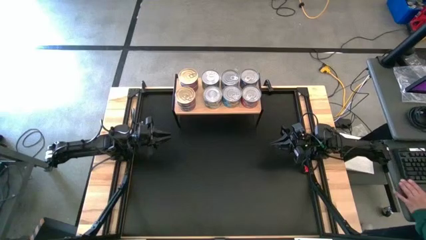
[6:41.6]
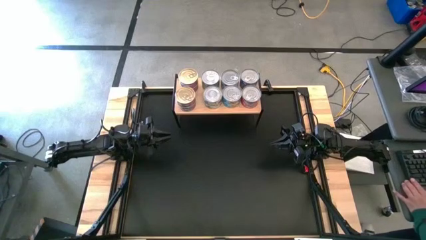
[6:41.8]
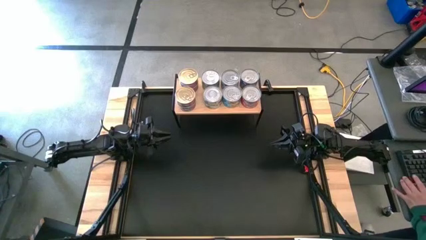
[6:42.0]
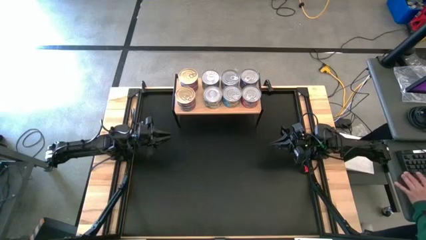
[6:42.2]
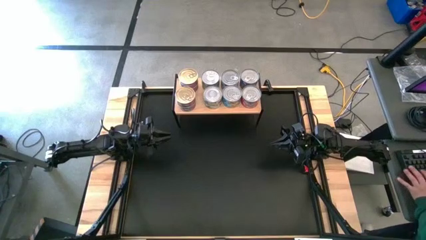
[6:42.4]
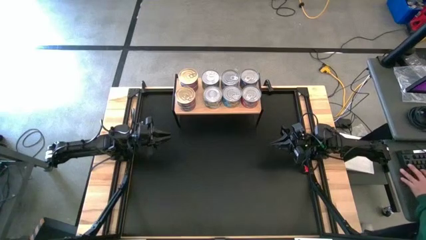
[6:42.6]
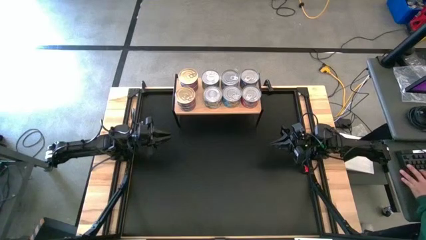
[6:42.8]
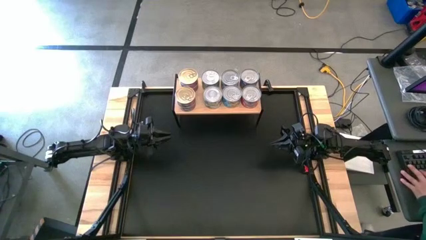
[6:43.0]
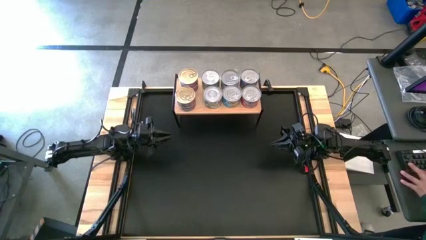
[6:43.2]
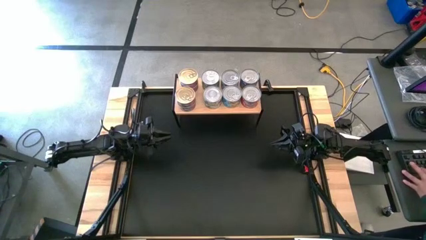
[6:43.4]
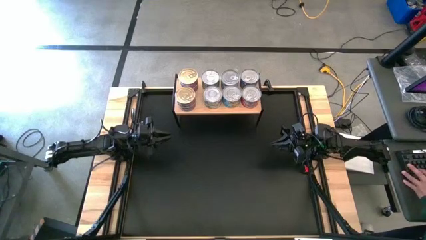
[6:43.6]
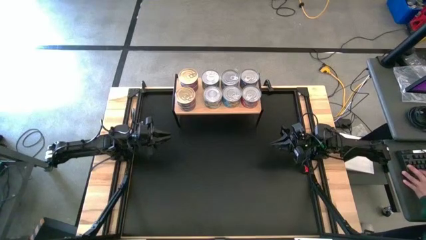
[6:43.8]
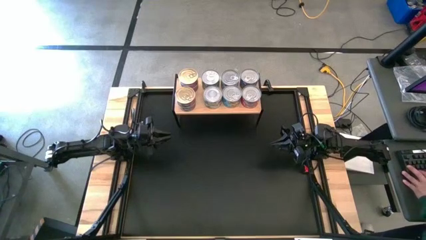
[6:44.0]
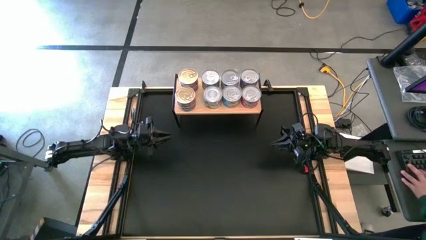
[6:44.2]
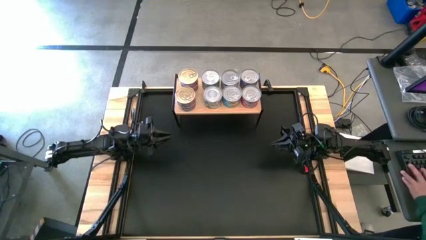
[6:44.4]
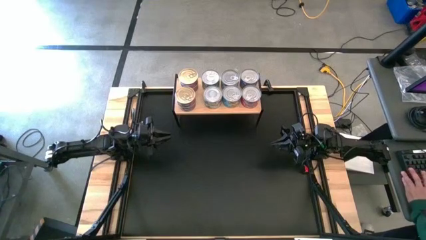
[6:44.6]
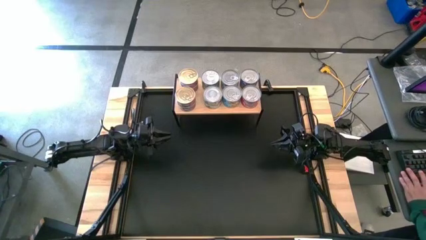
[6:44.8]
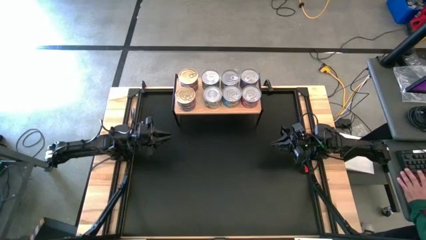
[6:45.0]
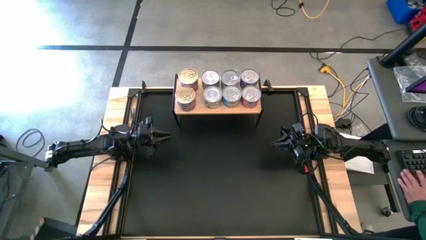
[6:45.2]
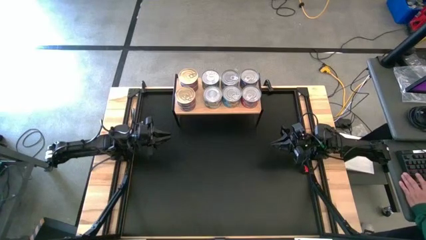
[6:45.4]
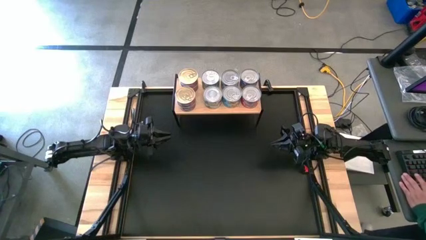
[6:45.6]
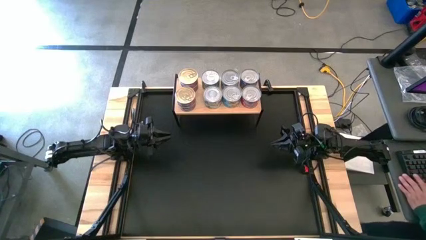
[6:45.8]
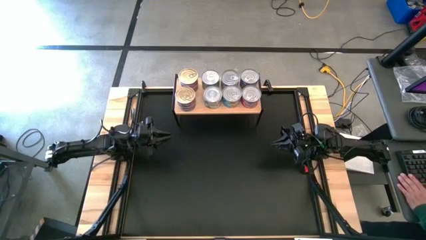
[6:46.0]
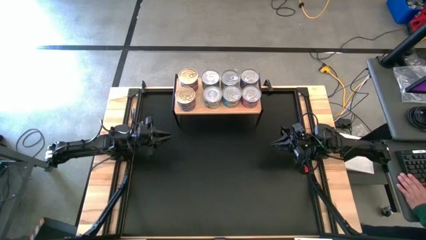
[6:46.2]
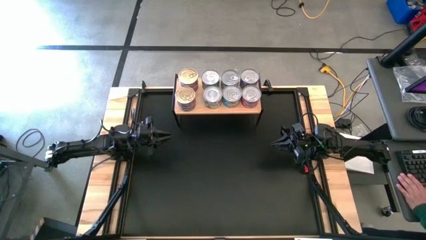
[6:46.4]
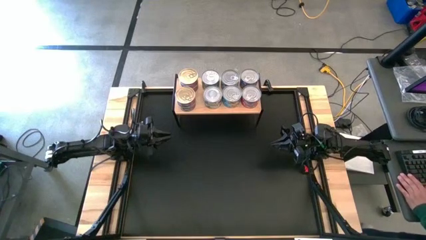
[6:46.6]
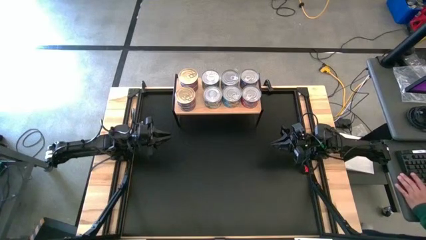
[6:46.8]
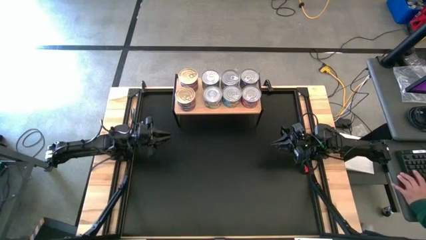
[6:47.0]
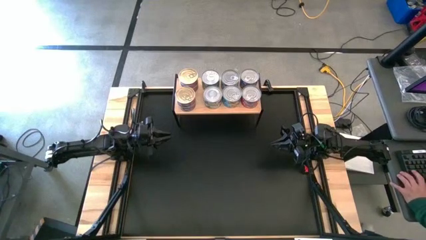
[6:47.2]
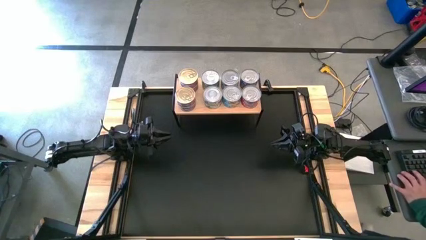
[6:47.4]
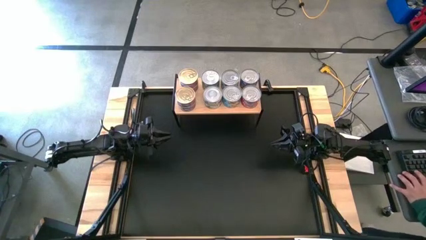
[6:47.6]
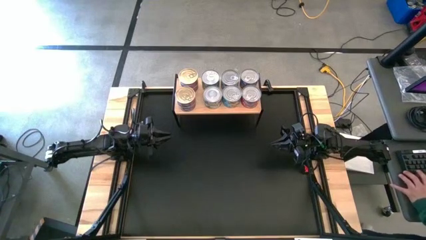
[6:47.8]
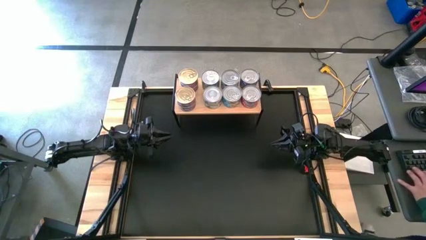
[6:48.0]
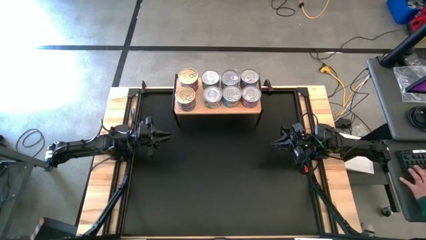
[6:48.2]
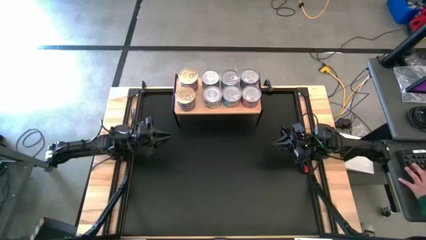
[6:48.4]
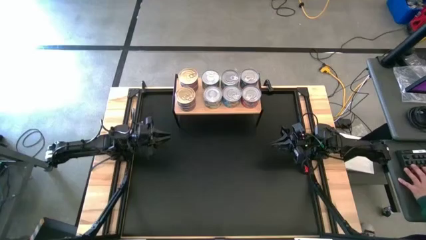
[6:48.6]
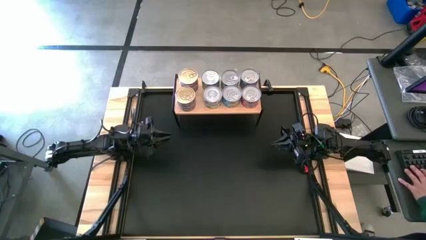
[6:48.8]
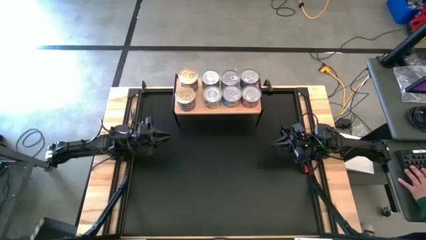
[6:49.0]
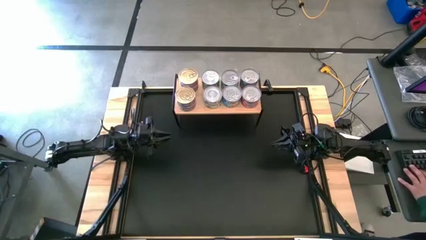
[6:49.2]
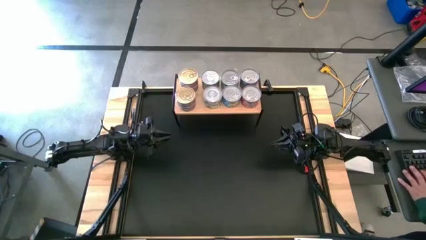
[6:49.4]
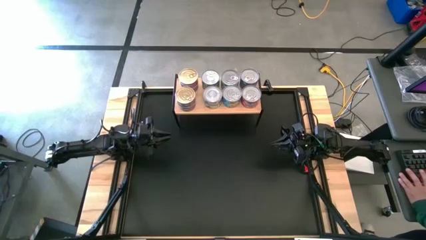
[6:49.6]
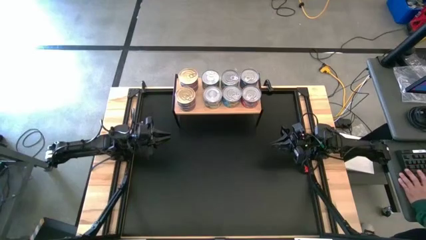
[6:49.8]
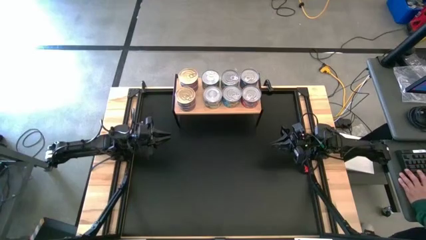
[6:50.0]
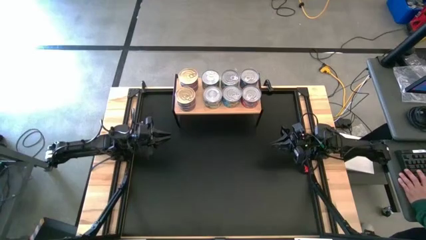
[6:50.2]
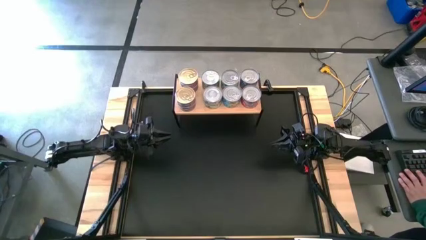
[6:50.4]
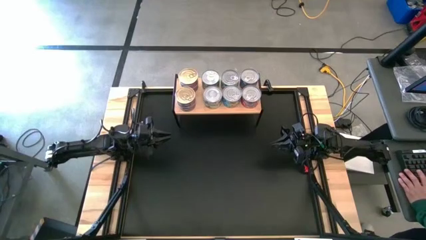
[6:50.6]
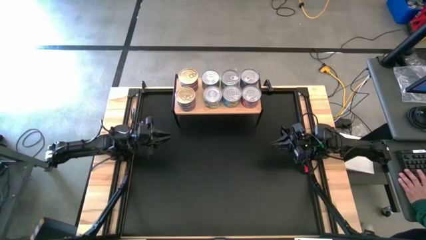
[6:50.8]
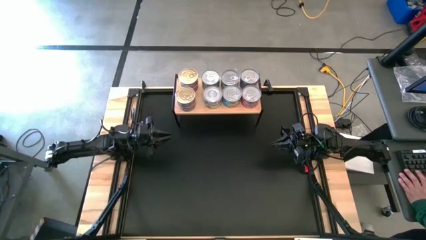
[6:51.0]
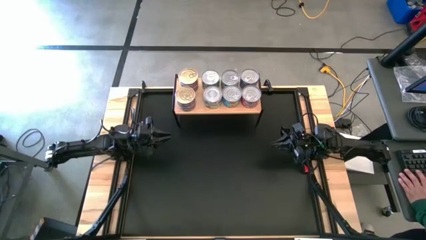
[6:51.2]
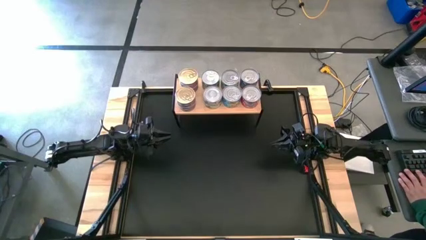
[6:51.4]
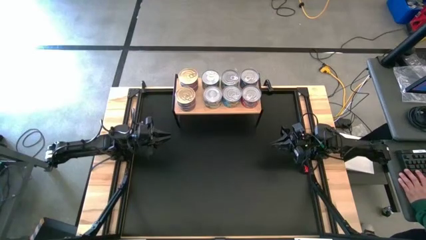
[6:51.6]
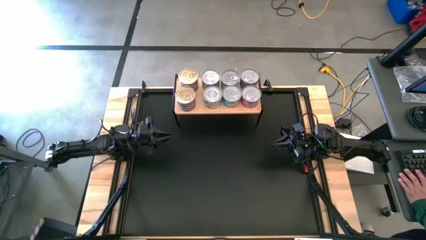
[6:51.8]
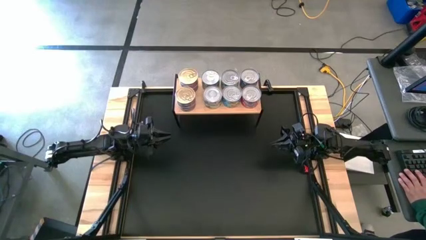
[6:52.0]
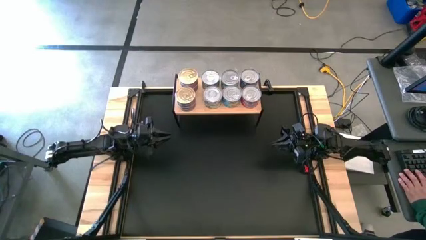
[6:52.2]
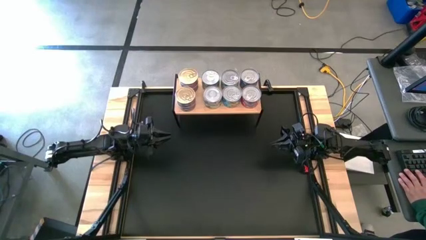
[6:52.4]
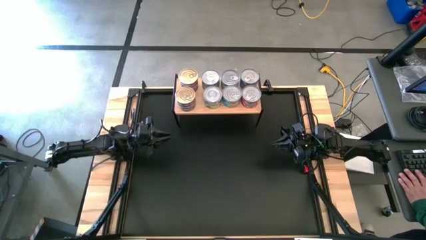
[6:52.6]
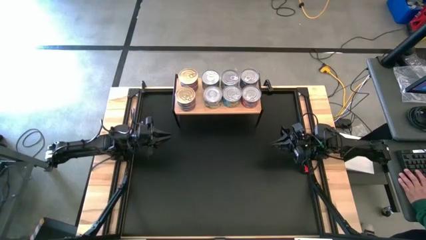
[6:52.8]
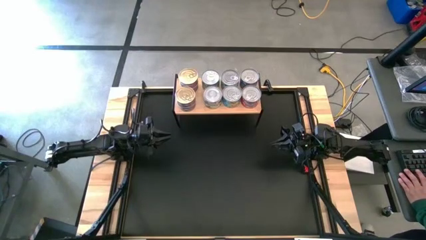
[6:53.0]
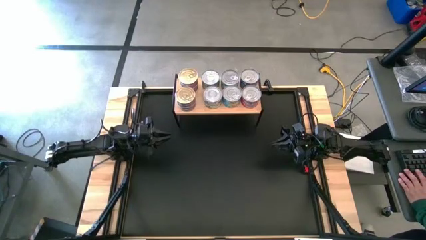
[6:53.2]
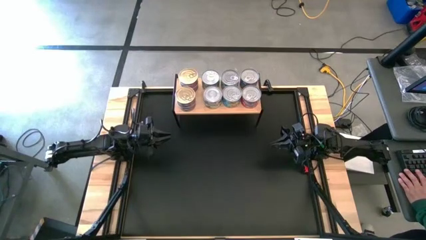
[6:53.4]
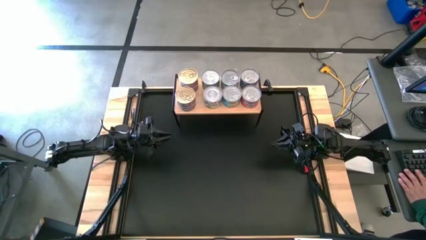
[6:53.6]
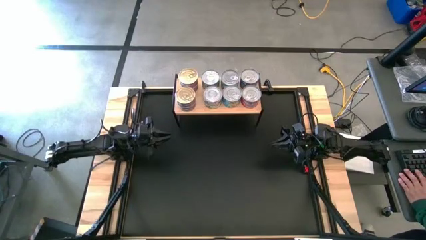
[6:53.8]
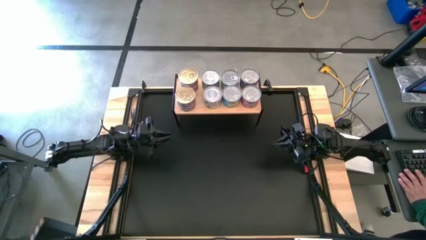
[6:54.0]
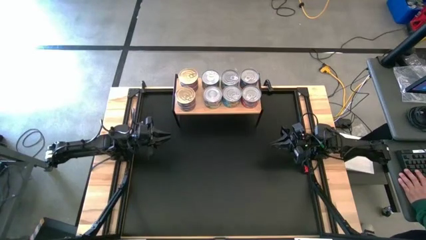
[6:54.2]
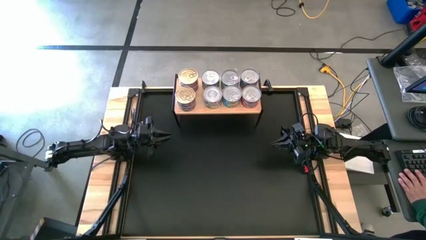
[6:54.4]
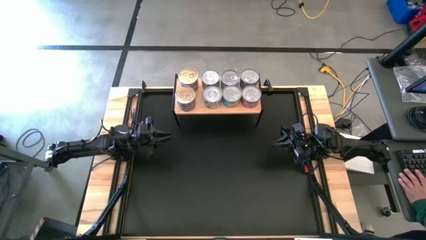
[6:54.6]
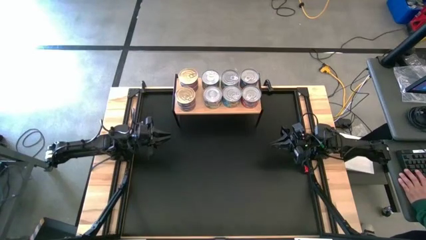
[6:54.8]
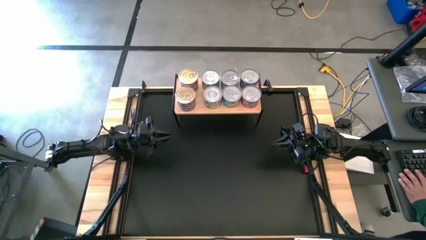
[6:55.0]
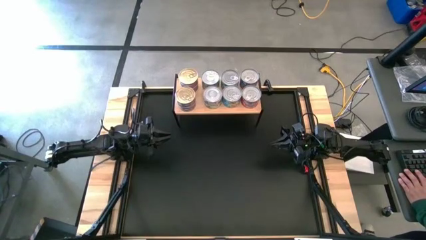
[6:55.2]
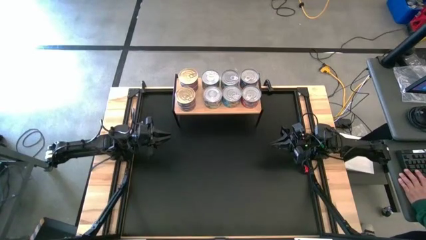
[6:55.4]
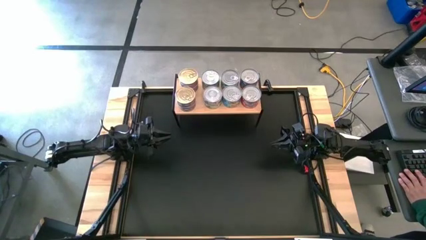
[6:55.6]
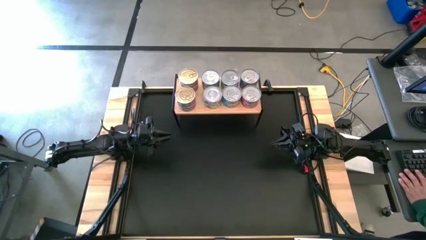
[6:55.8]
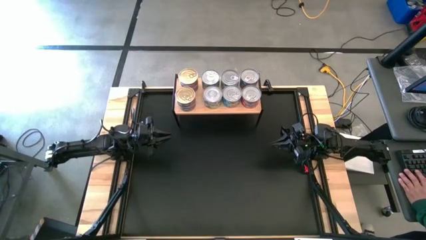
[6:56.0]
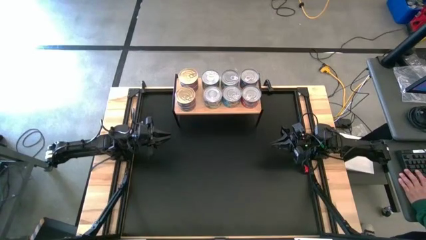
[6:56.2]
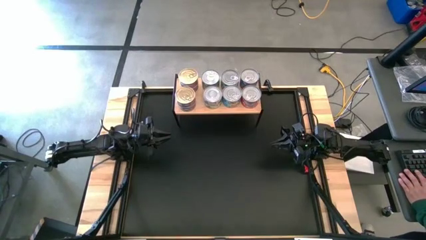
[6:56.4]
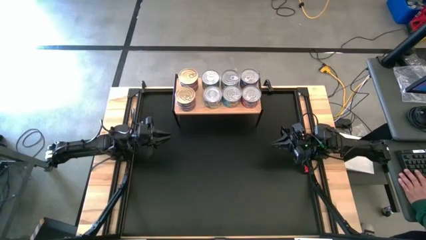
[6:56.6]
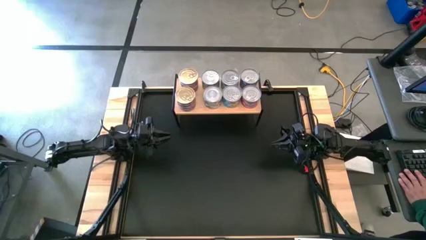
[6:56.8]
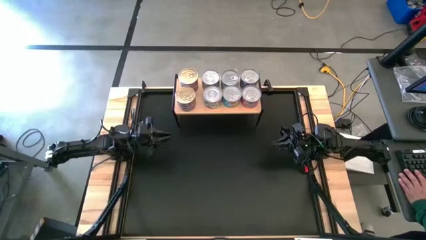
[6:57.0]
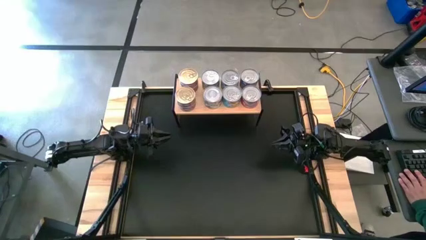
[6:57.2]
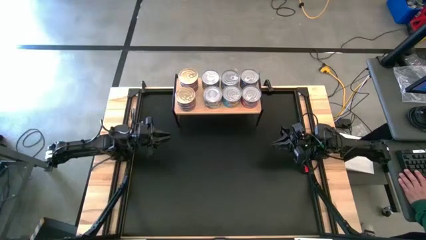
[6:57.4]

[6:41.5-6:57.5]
Task: Stack canned seafood by type on shelf
Return to Home Position
